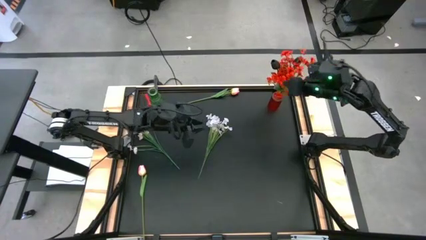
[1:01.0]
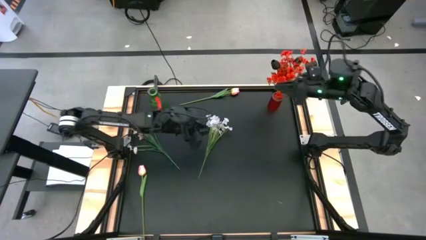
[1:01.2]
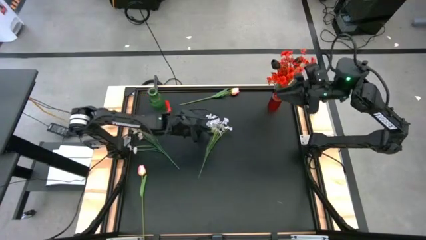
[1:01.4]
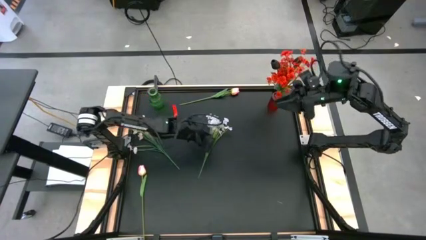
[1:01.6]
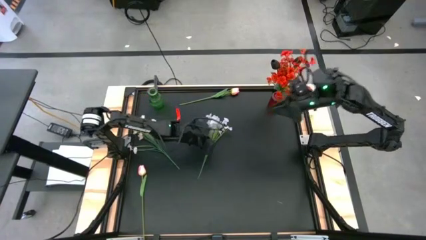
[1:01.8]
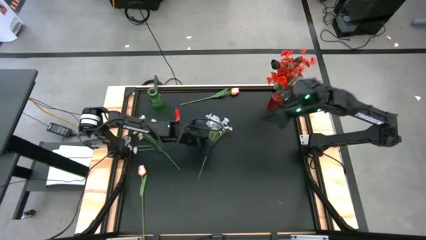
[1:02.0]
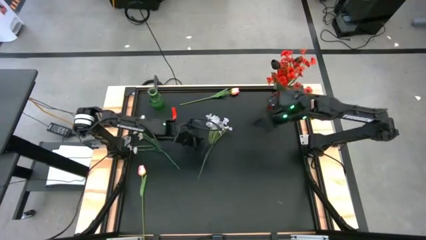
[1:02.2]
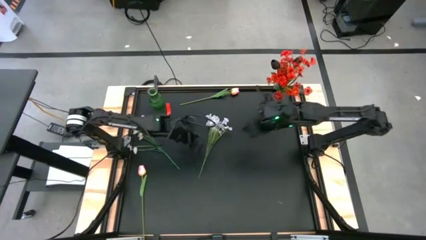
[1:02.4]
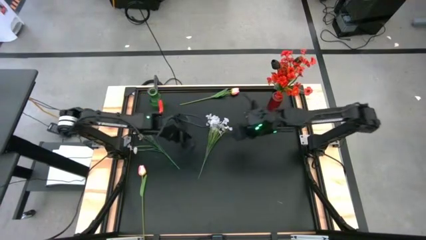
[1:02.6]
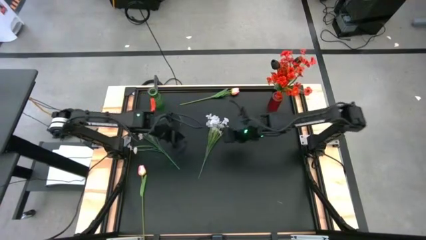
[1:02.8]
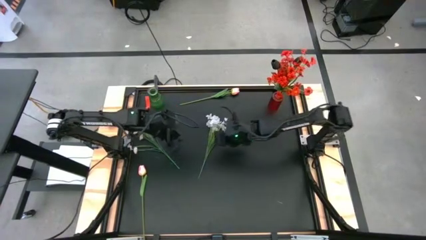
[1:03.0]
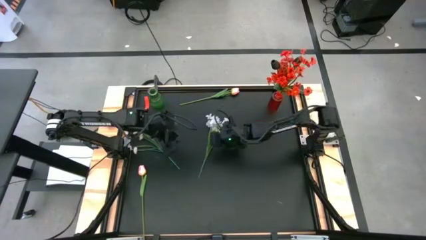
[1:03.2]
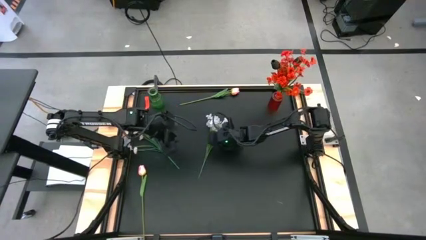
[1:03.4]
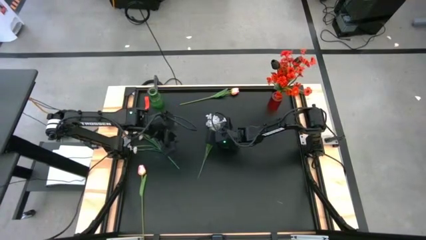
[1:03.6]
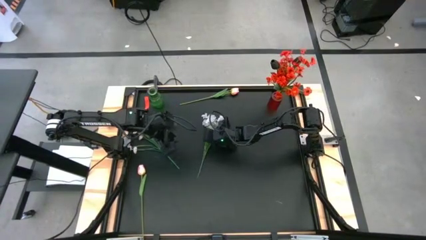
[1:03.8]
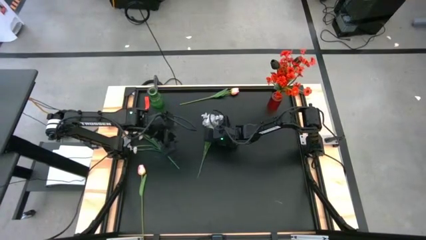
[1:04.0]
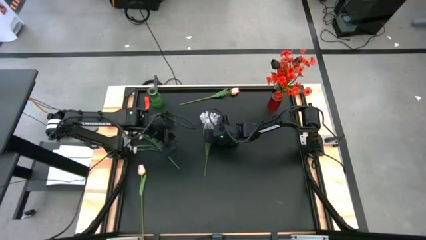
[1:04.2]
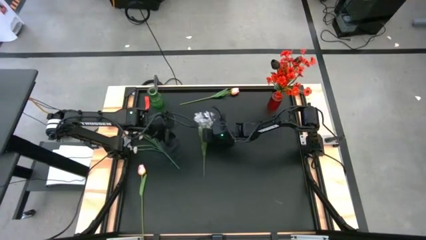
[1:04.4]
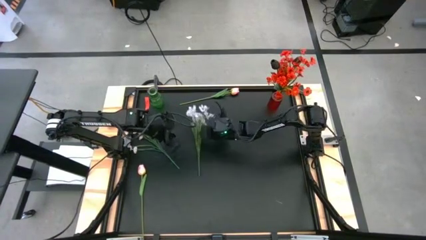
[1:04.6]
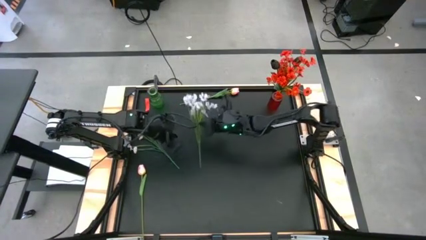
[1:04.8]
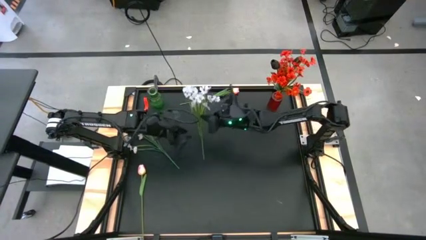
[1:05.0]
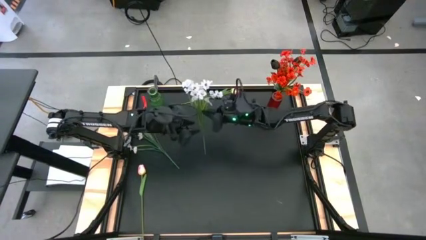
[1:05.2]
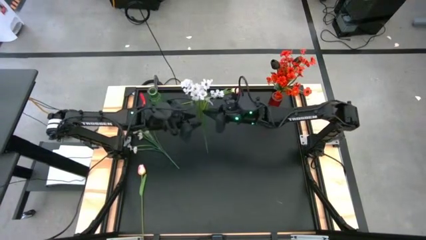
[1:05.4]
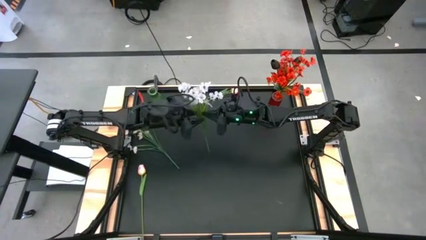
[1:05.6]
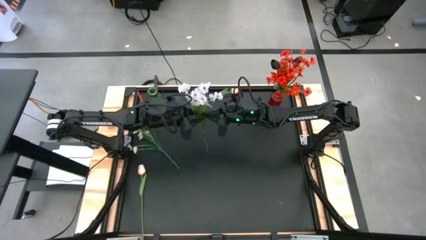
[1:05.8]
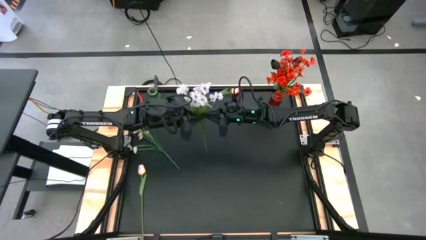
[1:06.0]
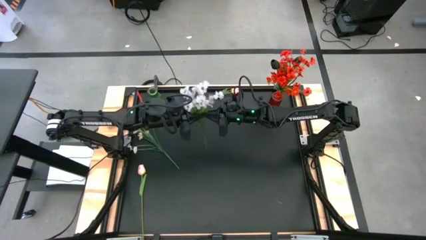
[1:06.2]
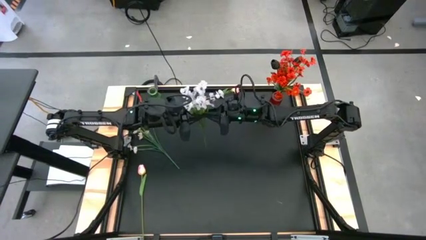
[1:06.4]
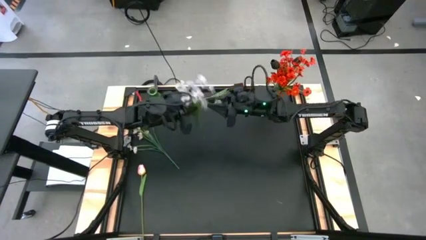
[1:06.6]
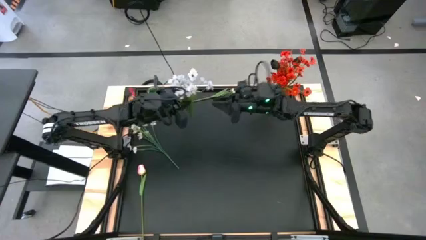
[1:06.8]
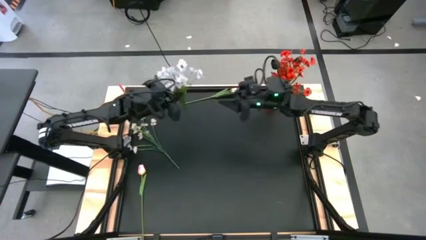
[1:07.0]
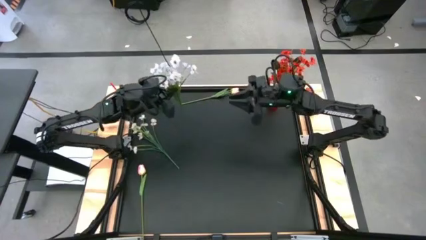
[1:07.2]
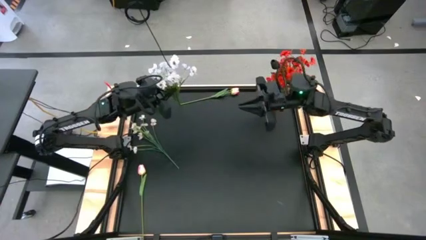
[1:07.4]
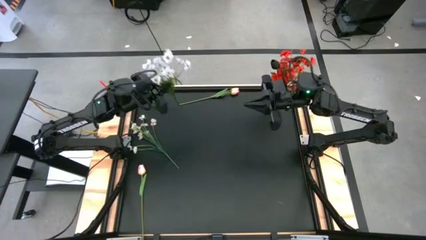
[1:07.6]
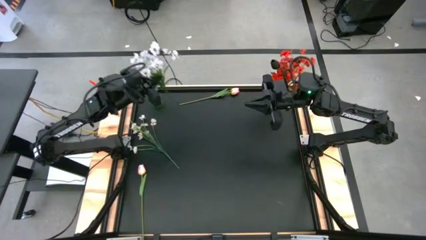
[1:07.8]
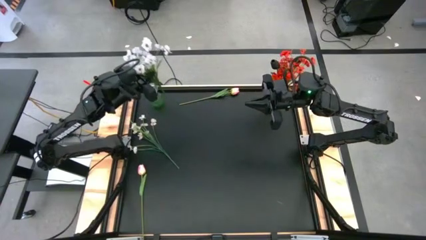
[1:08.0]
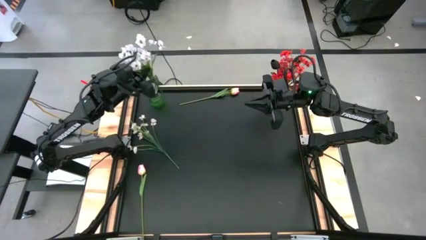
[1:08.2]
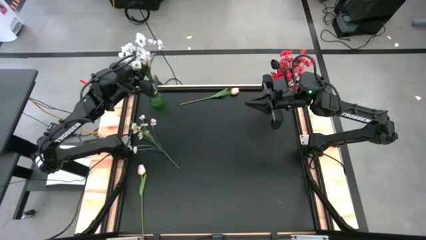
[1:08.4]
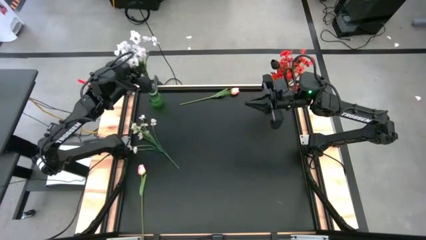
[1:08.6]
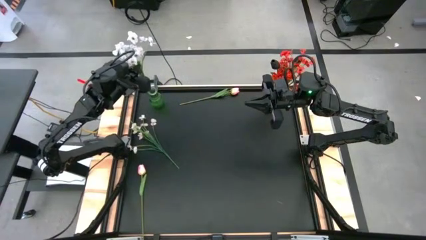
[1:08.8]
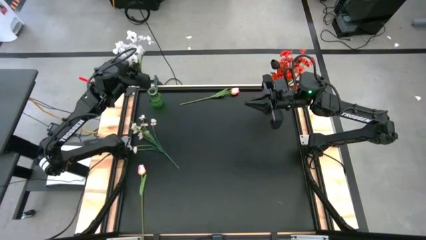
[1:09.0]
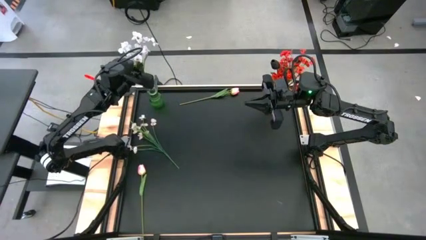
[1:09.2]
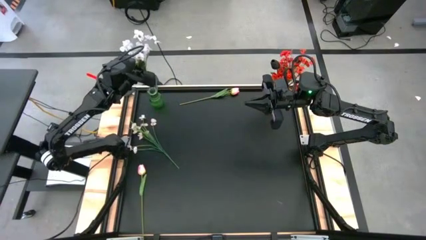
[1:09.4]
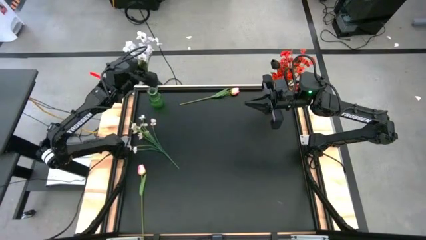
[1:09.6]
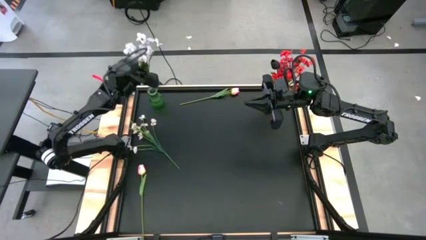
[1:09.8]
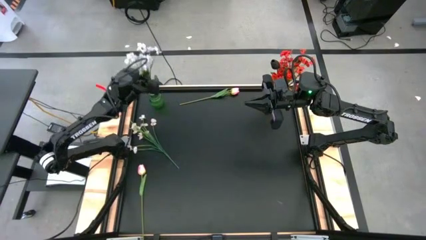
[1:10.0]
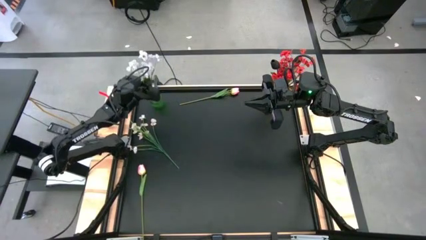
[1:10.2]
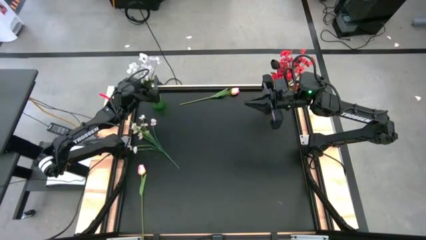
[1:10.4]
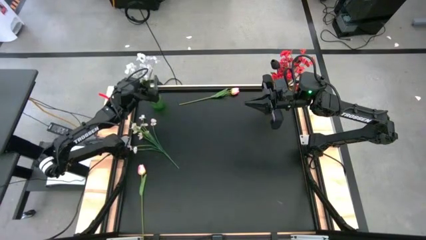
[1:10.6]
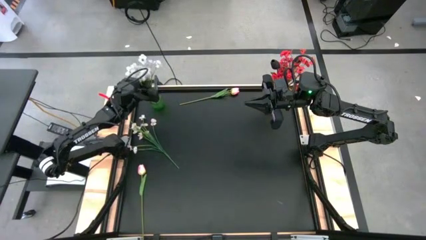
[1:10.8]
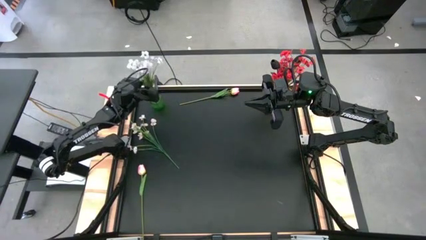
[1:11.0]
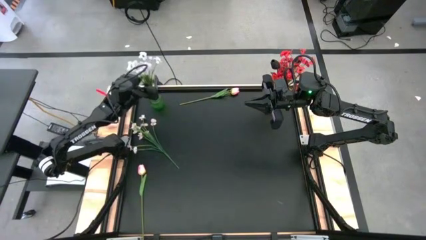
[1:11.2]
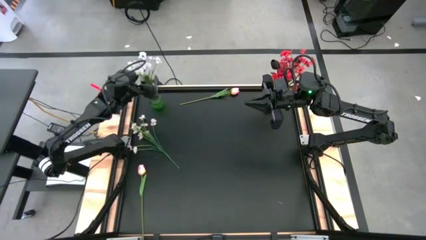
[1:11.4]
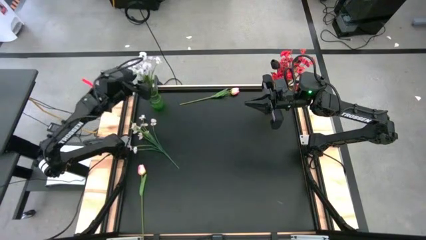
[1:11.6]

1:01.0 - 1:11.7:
Task: Sort flowers into vase by color
Put the right white flower into the green flower vase
